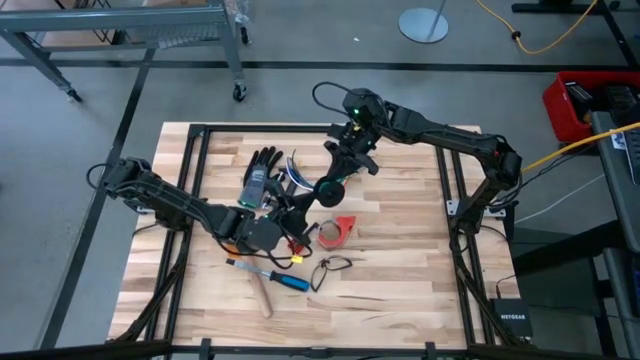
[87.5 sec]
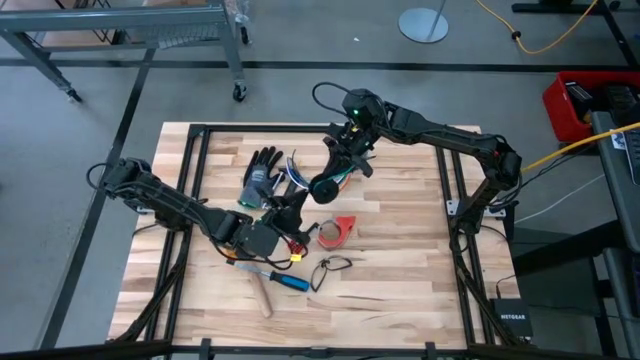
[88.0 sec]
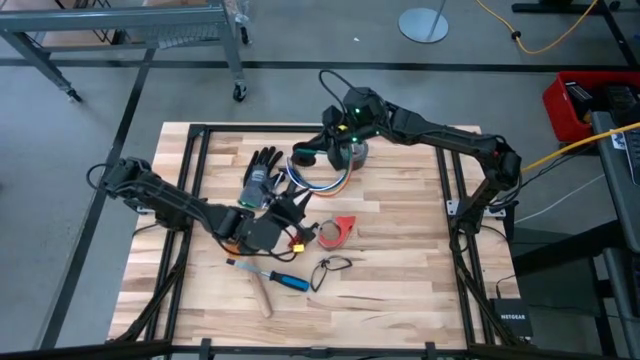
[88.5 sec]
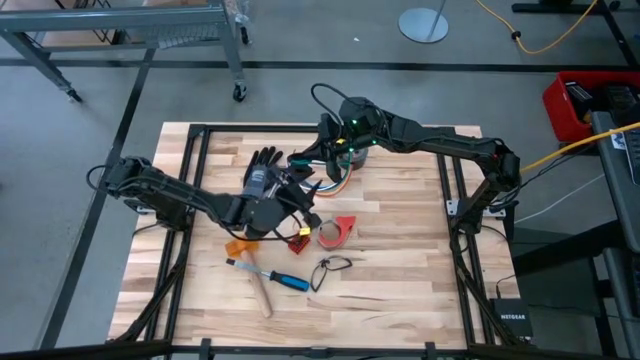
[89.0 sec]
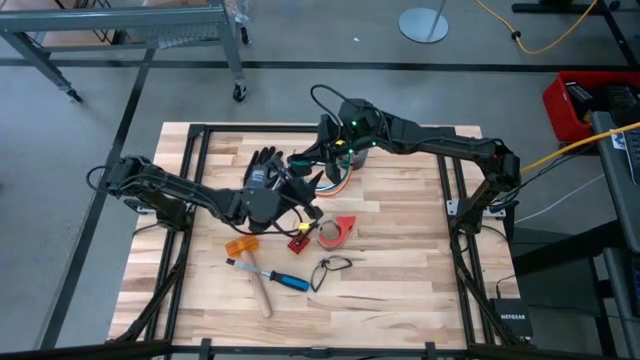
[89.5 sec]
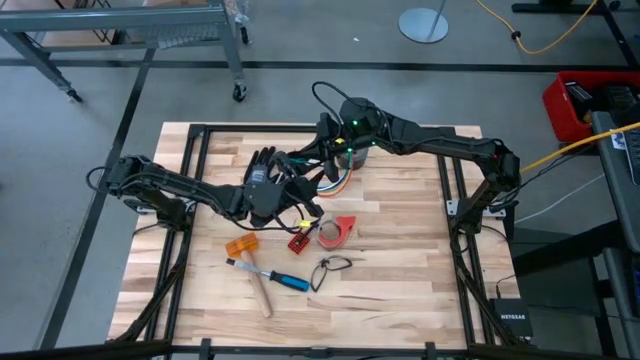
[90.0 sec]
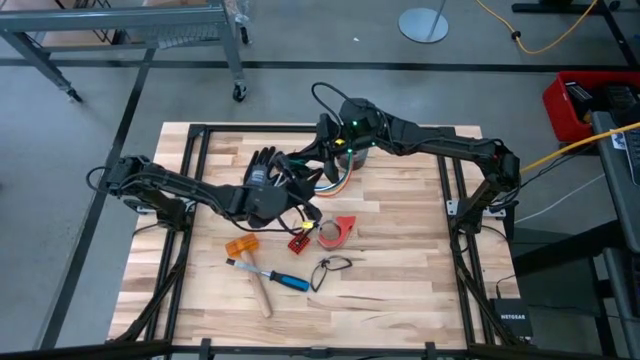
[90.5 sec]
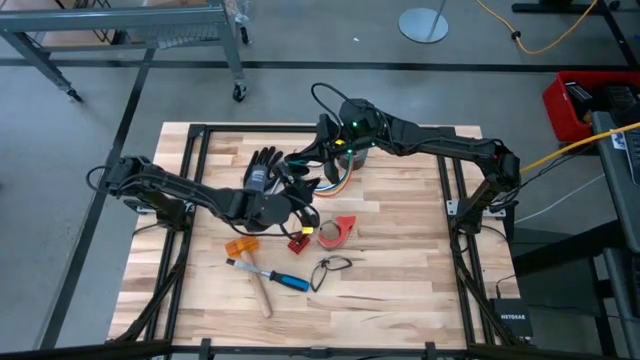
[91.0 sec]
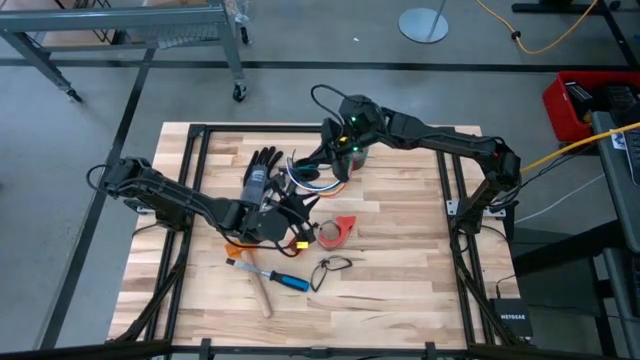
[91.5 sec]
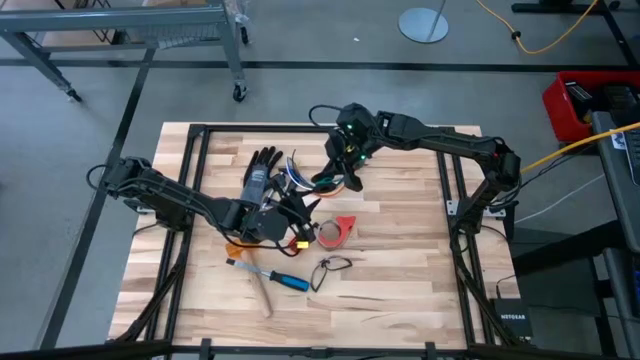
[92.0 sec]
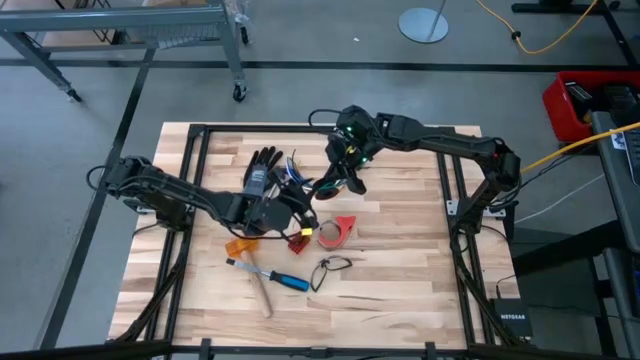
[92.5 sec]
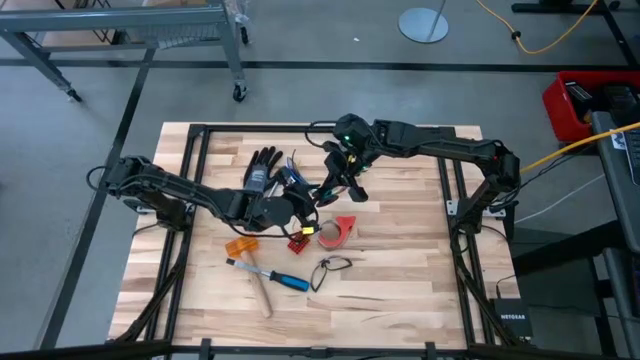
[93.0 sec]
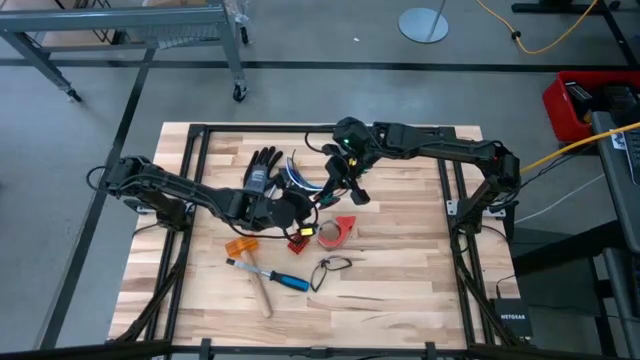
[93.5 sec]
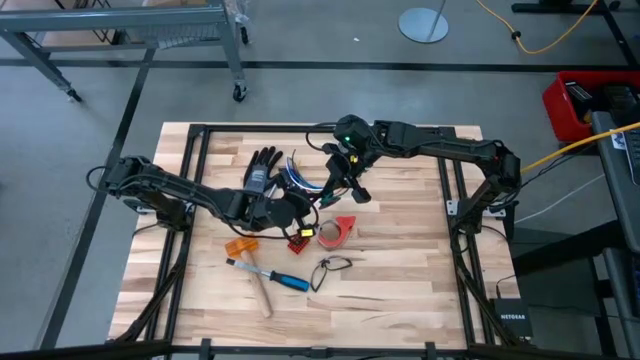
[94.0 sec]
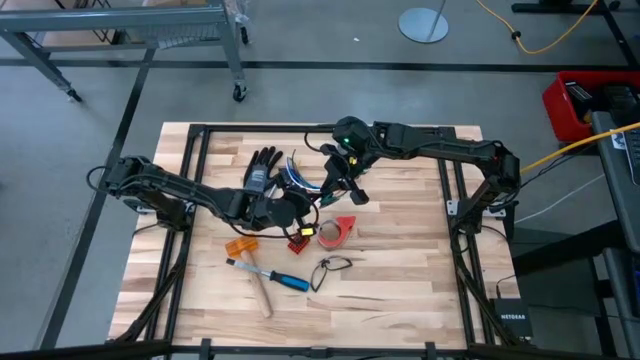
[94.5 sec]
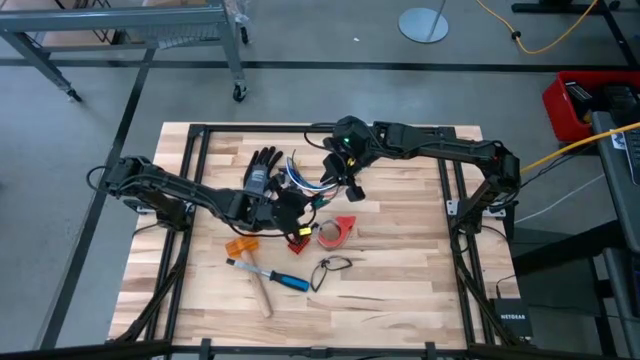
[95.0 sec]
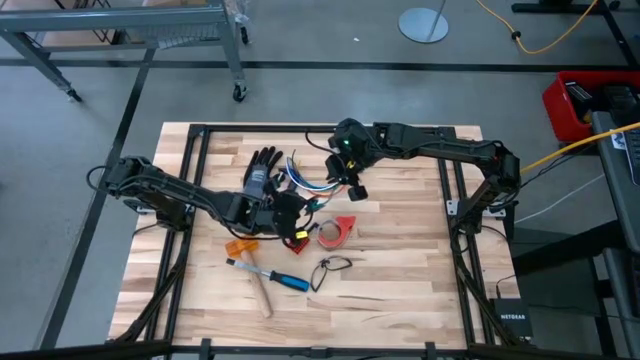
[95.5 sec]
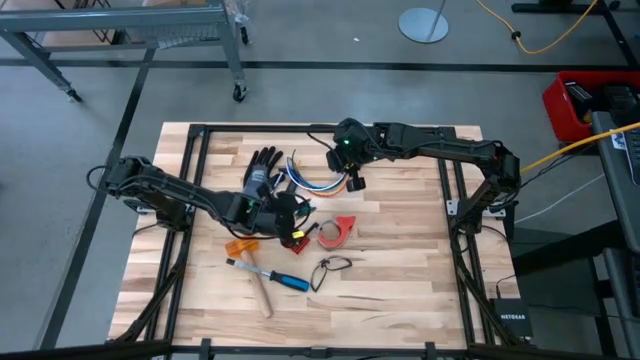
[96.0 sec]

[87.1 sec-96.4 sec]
Task: Coil cords
Coil the wire onto the spool
